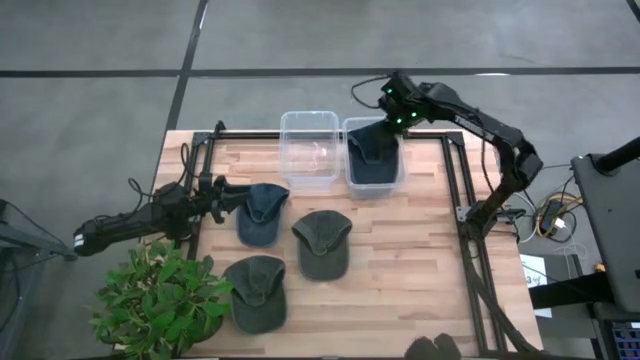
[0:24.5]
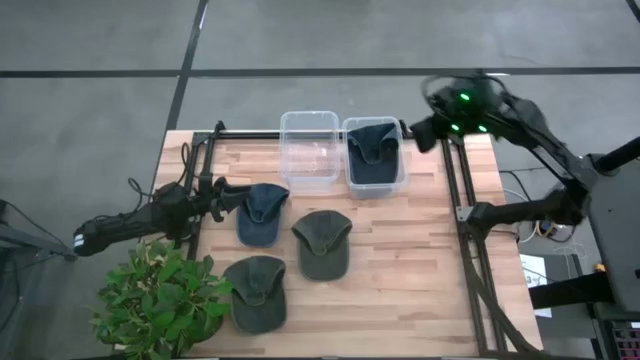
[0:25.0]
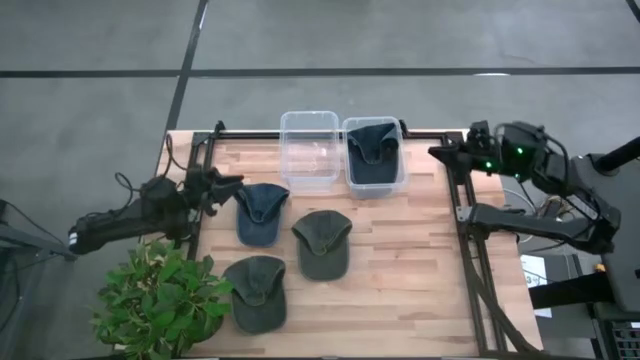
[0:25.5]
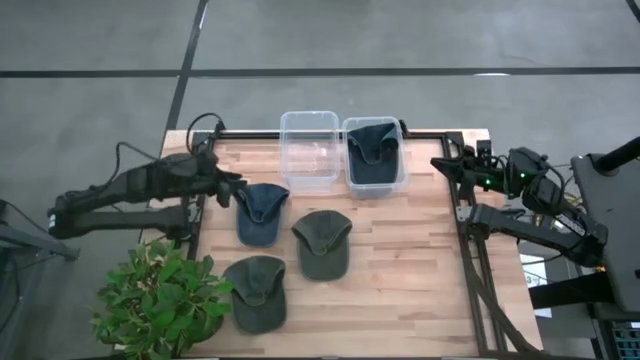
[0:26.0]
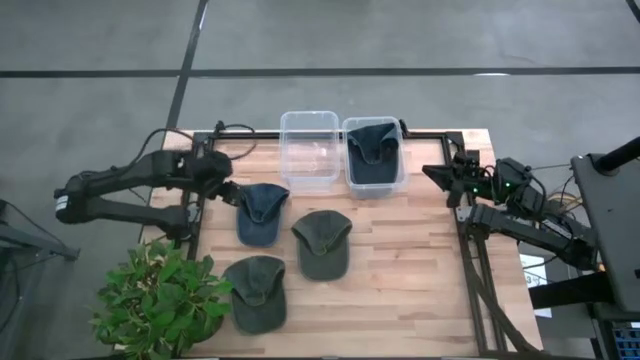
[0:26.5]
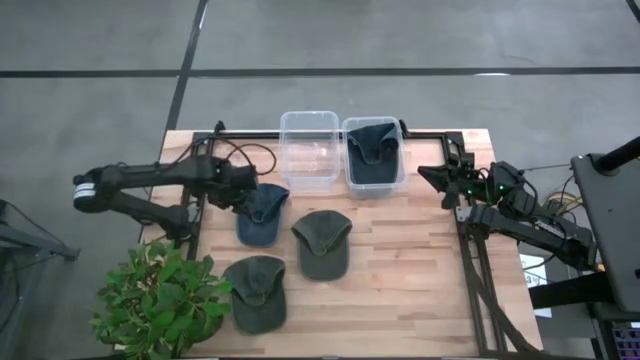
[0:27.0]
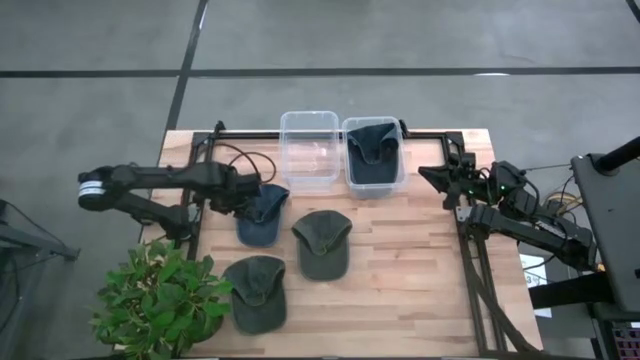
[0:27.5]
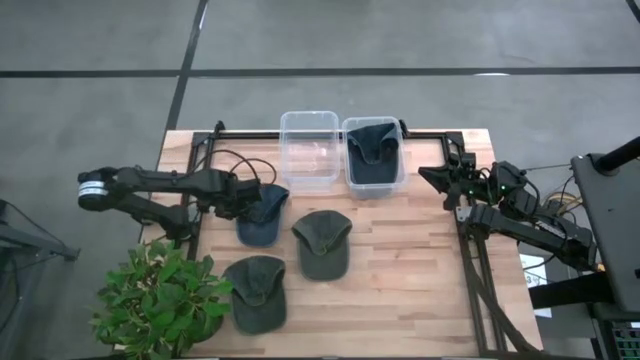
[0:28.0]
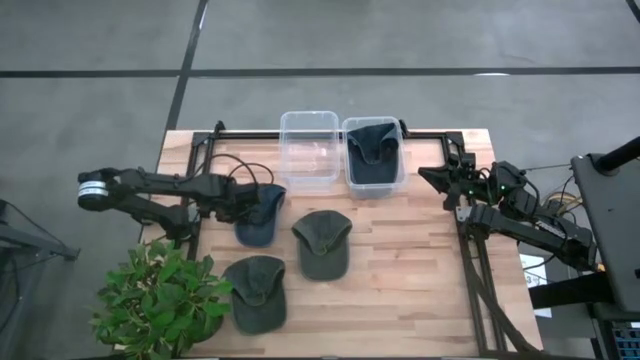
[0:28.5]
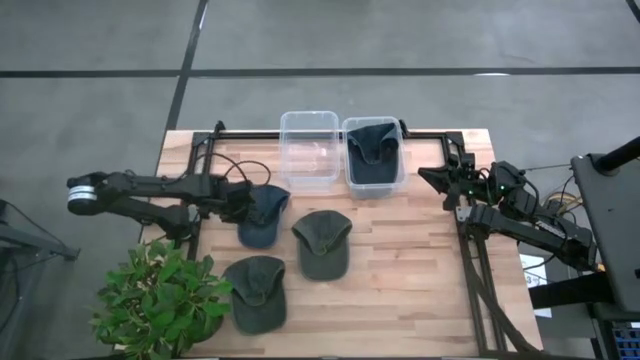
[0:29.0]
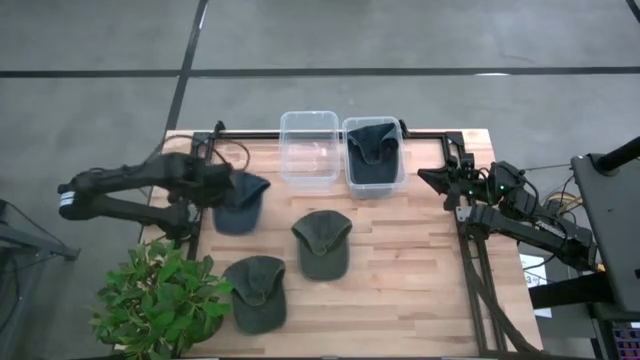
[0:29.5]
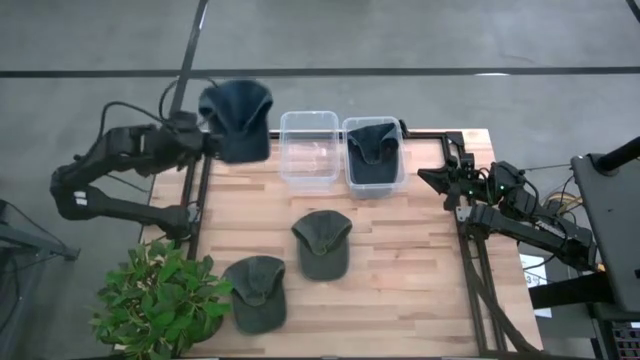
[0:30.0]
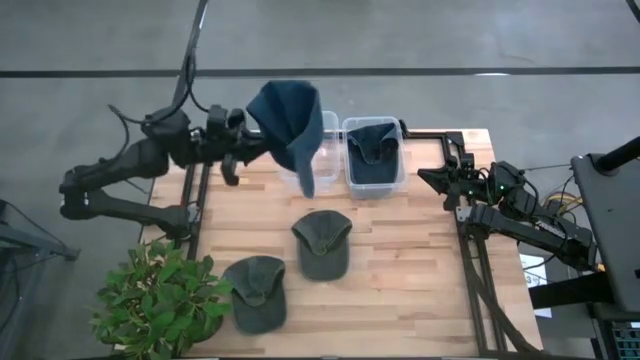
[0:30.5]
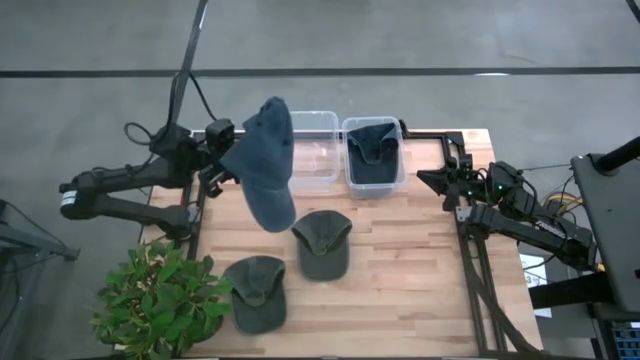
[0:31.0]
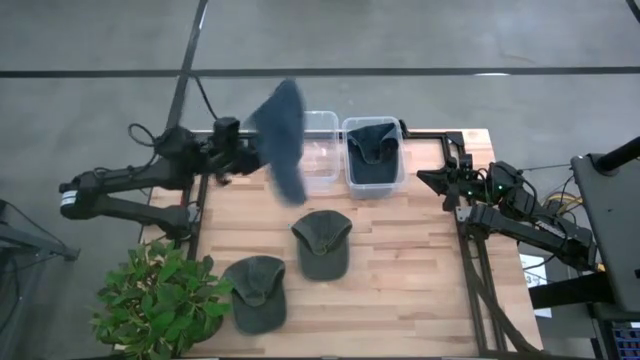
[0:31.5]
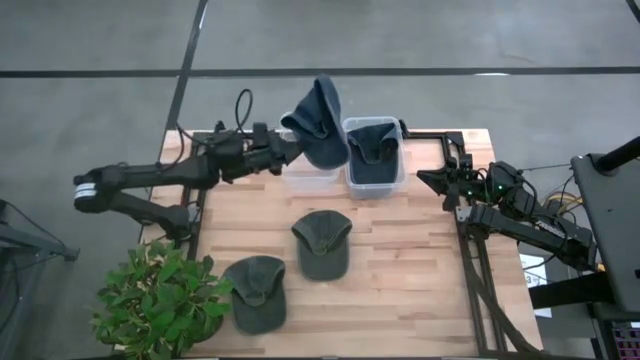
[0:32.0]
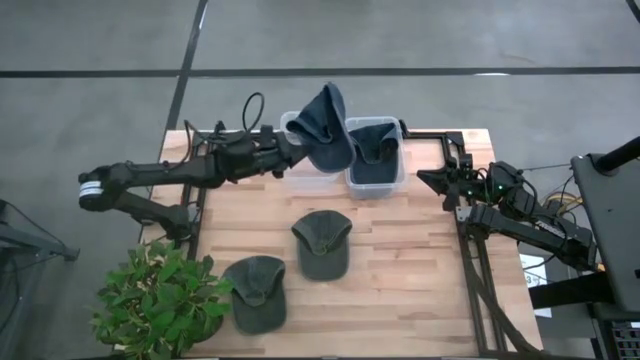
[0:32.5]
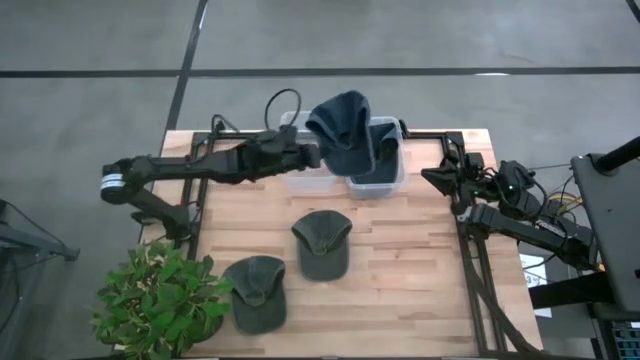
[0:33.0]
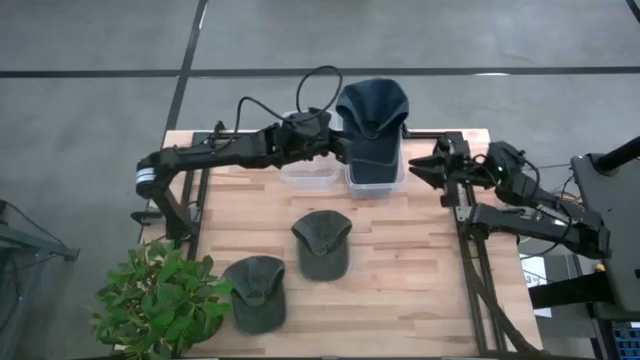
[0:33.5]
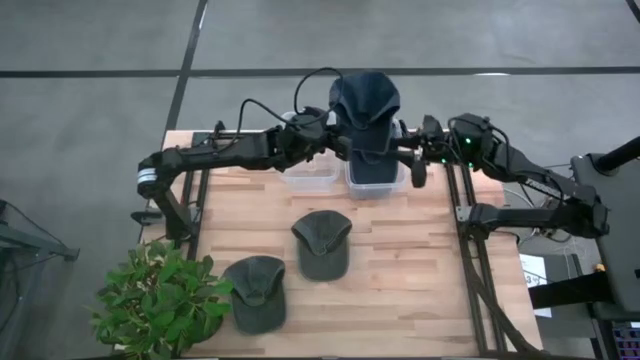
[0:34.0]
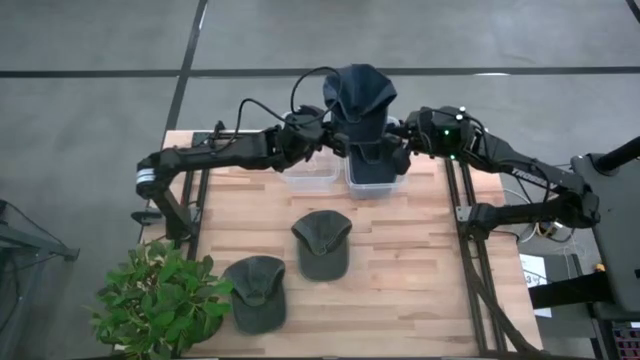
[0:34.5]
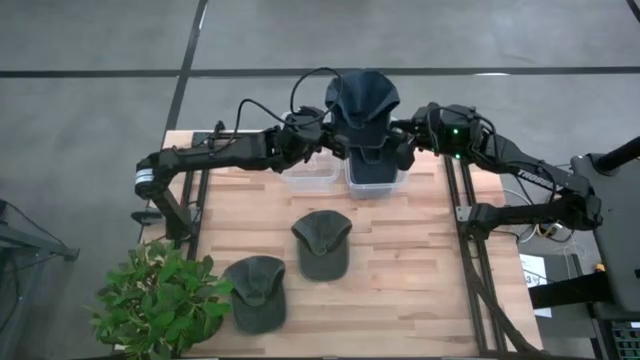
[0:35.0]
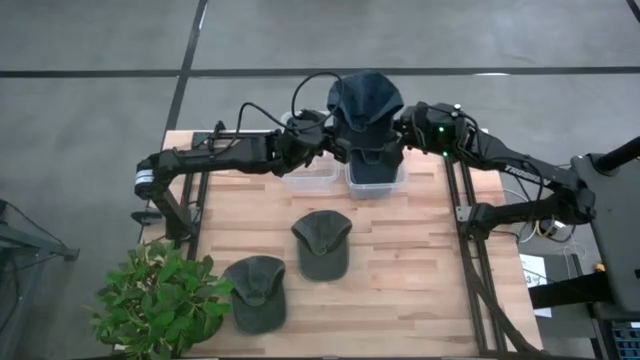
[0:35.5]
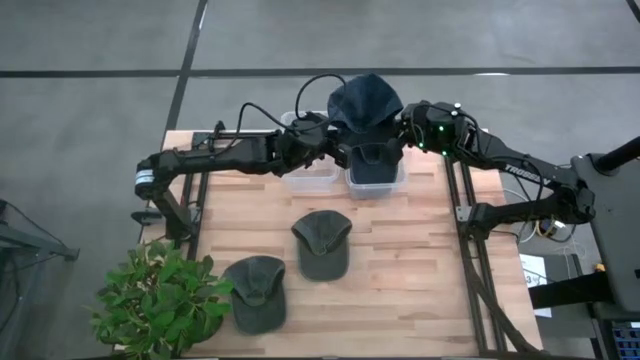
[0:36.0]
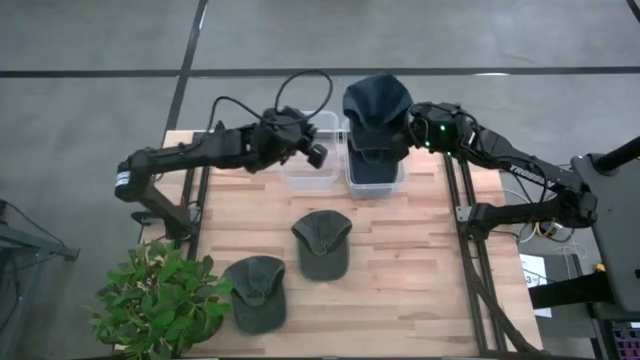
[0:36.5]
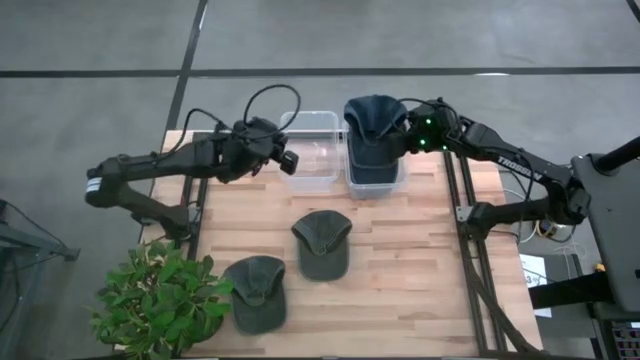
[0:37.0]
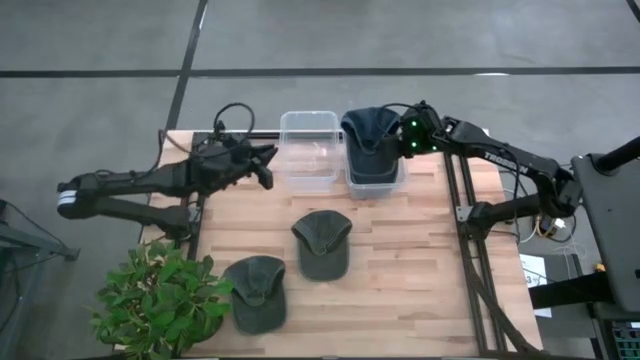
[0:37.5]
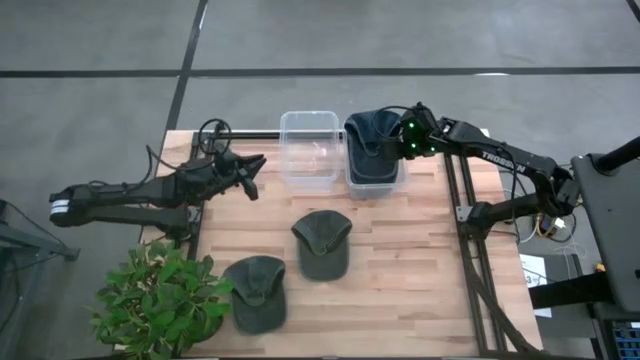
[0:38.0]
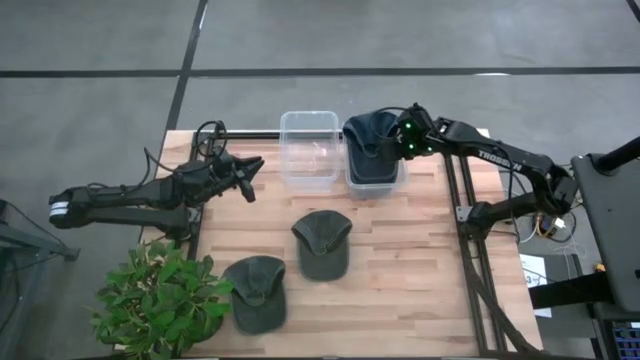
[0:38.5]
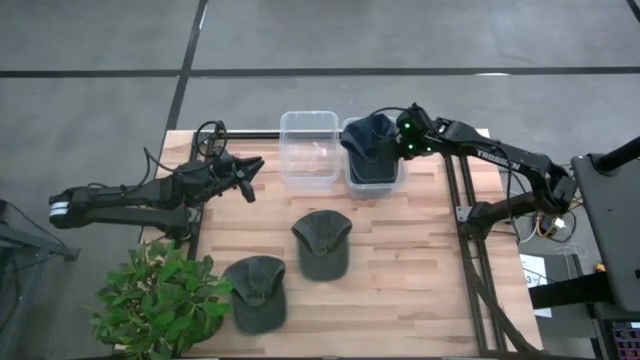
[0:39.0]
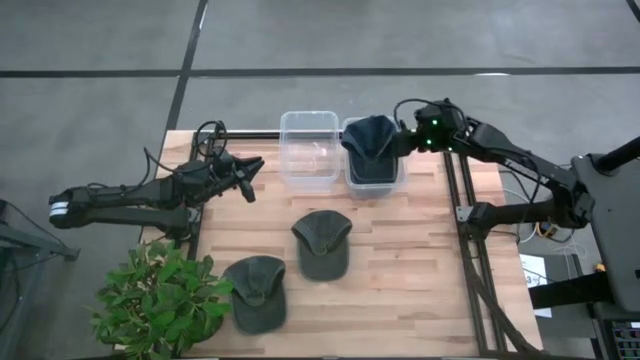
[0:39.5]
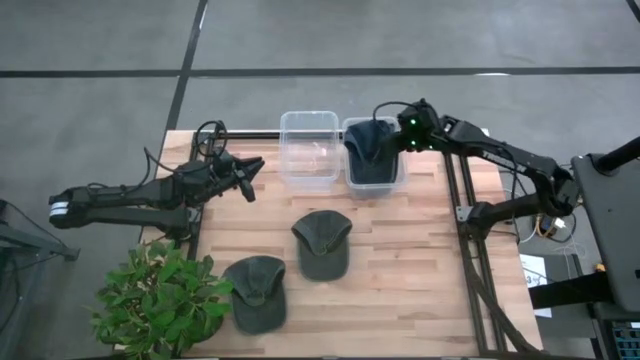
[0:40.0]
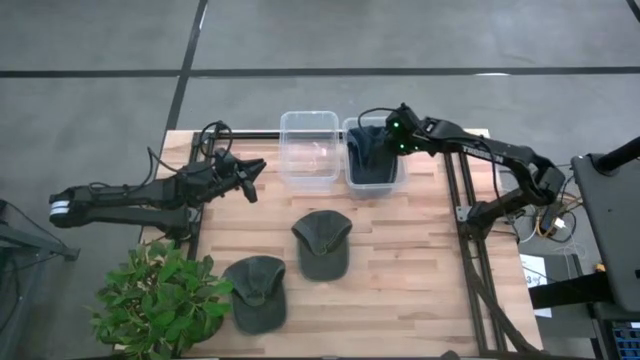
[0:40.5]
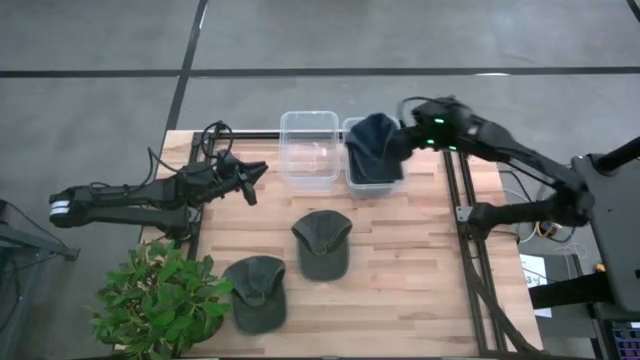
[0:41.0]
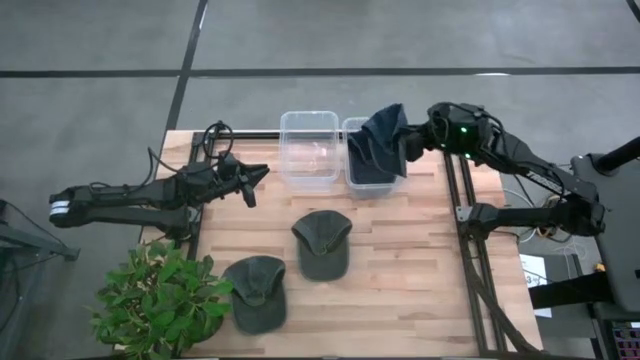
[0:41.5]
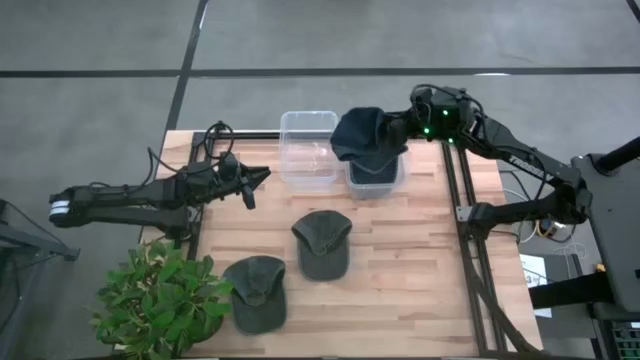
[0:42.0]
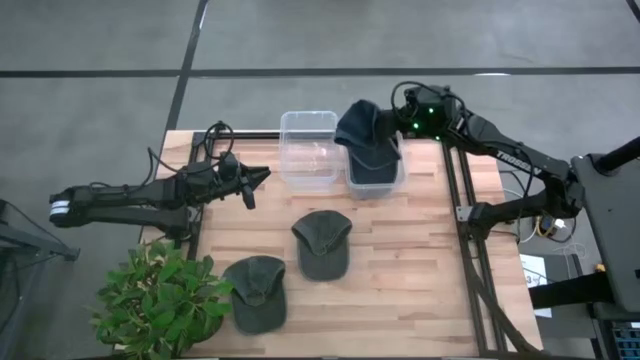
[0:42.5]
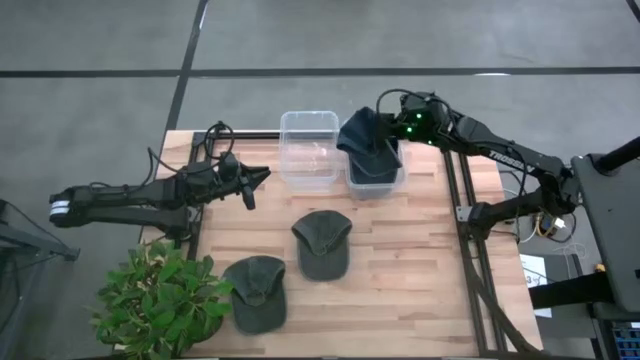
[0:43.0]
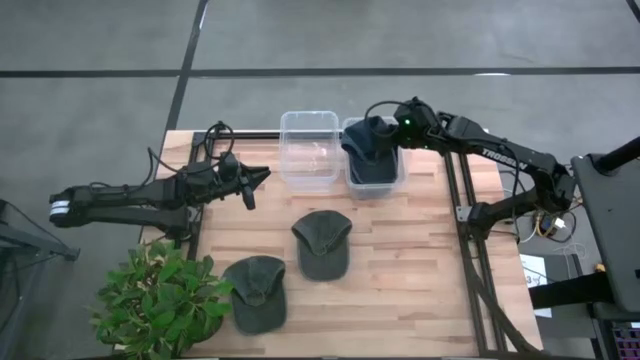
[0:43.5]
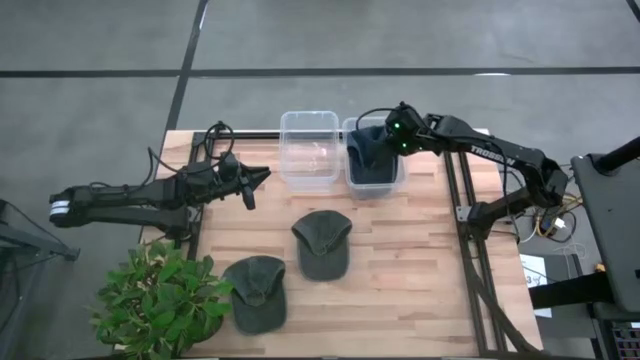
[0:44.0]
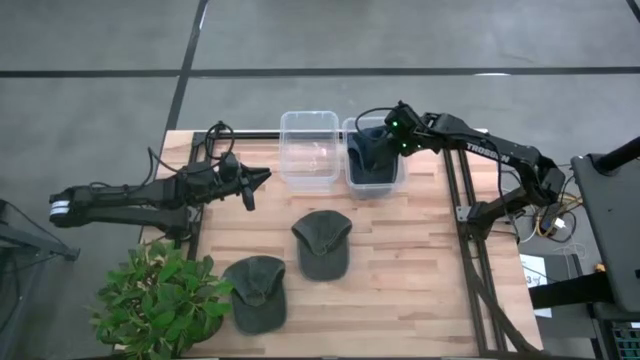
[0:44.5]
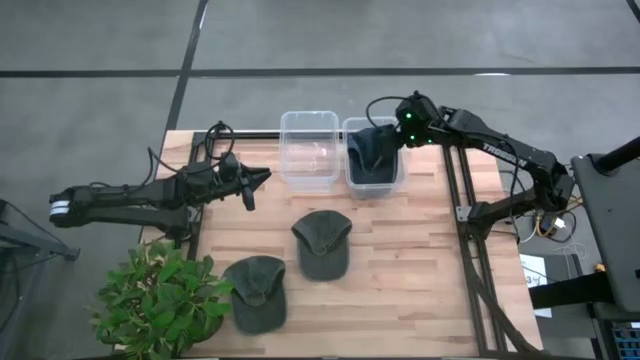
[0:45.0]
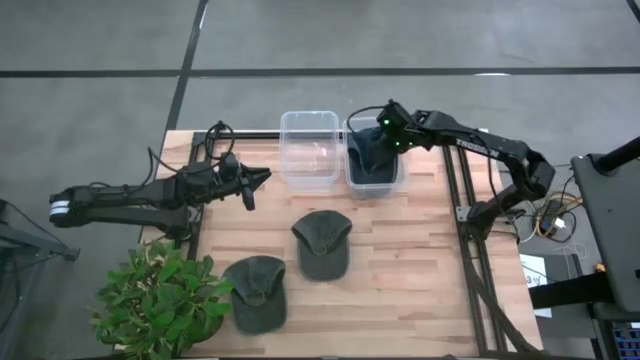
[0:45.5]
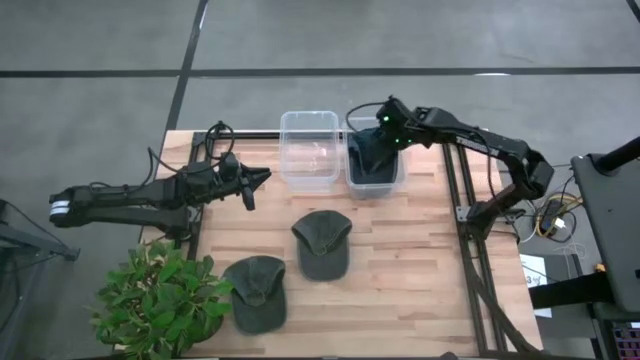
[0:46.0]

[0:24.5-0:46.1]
Task: Pick & Place hat
Put the blue cap into the right transparent bin
